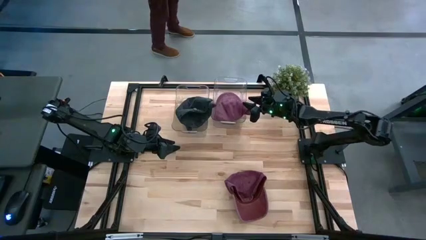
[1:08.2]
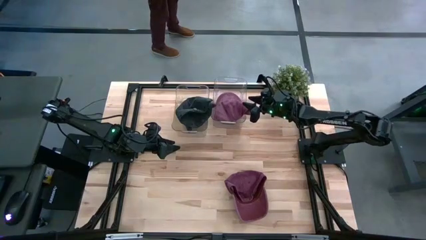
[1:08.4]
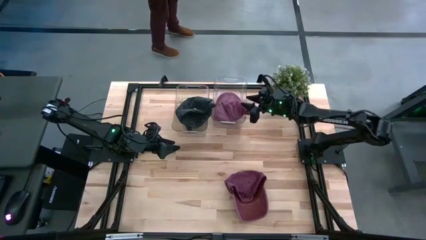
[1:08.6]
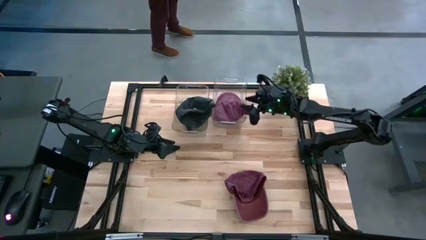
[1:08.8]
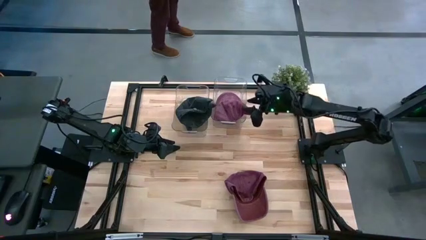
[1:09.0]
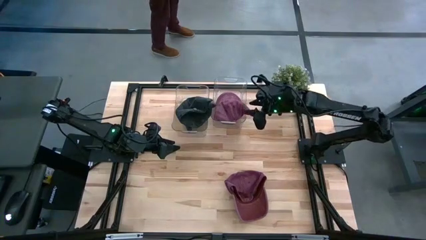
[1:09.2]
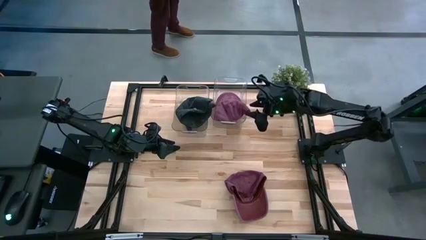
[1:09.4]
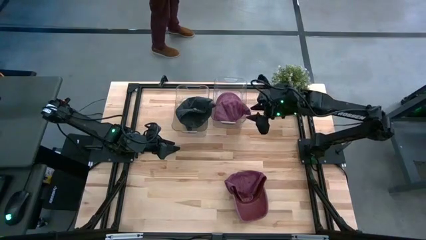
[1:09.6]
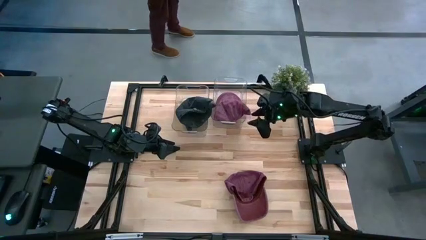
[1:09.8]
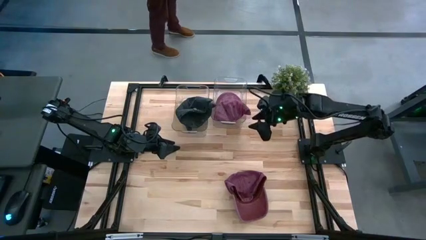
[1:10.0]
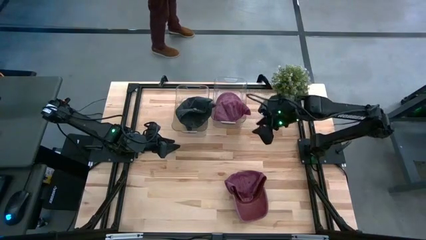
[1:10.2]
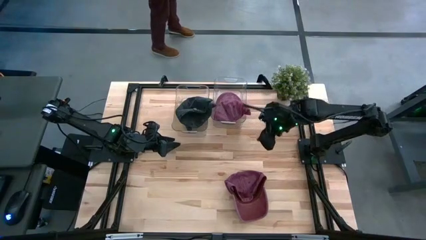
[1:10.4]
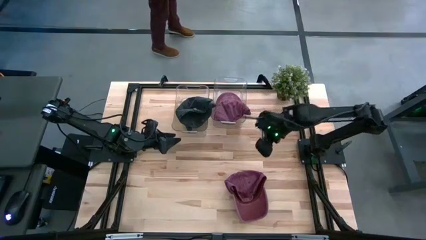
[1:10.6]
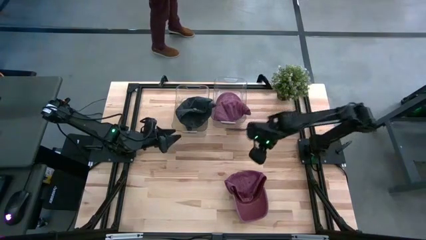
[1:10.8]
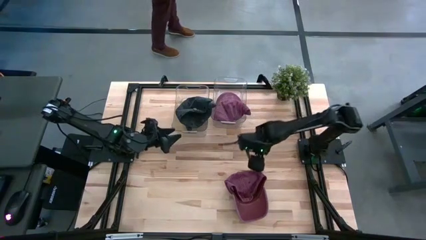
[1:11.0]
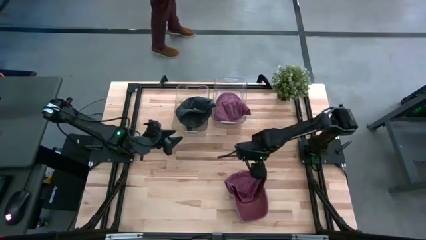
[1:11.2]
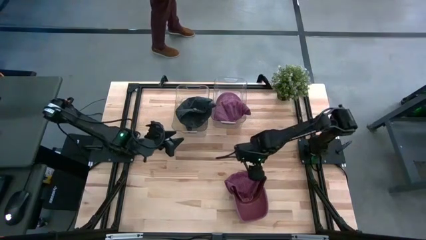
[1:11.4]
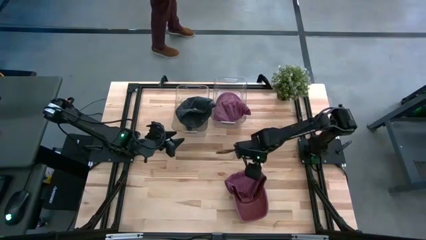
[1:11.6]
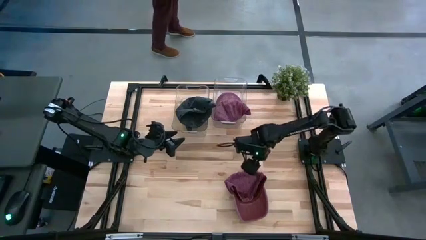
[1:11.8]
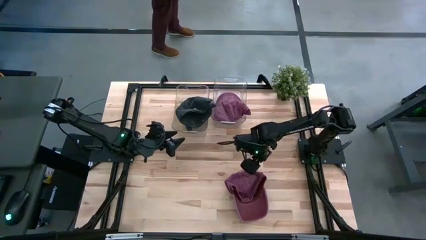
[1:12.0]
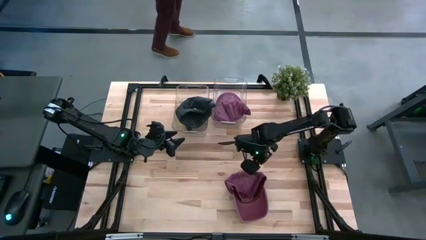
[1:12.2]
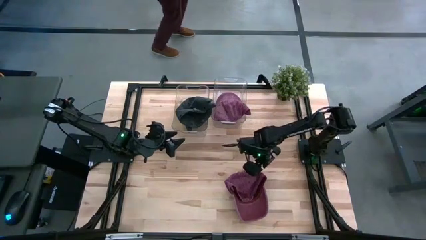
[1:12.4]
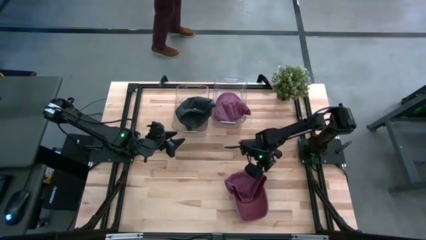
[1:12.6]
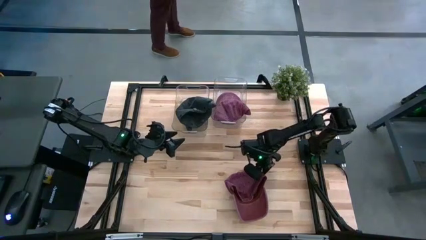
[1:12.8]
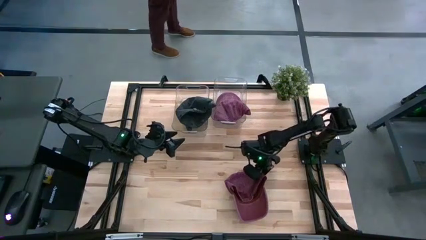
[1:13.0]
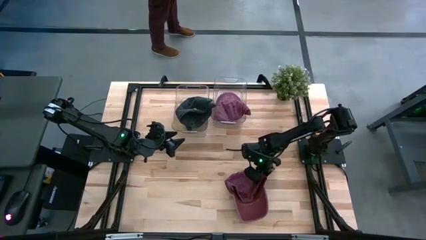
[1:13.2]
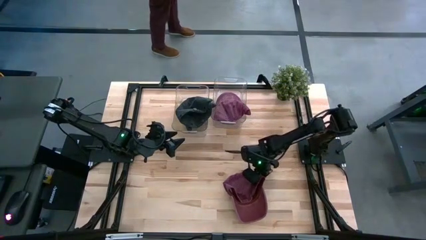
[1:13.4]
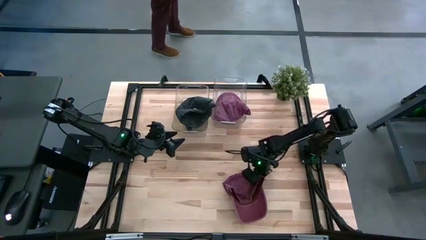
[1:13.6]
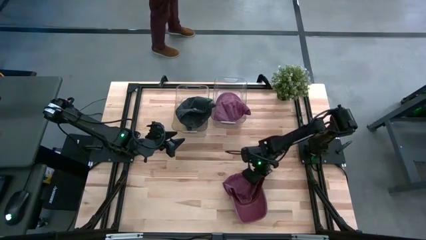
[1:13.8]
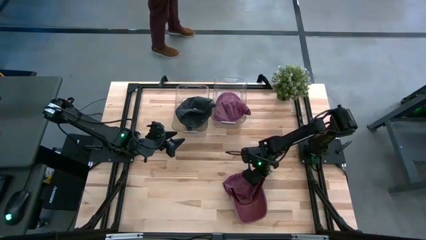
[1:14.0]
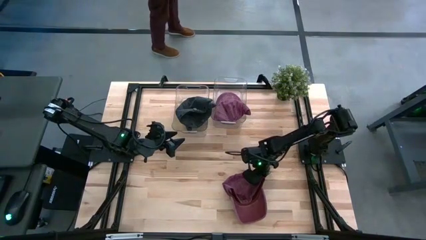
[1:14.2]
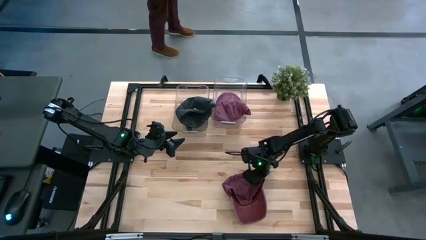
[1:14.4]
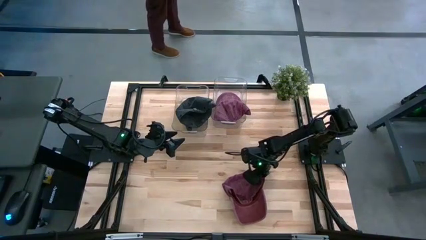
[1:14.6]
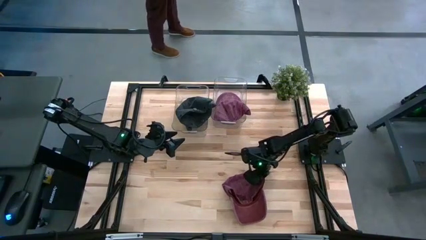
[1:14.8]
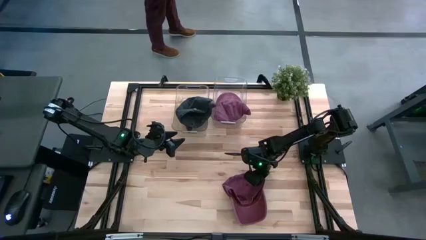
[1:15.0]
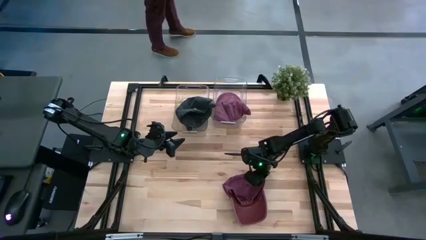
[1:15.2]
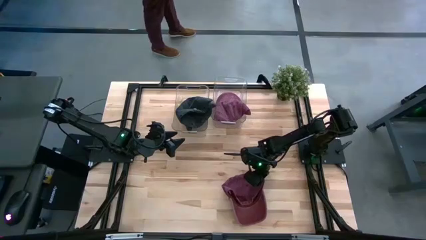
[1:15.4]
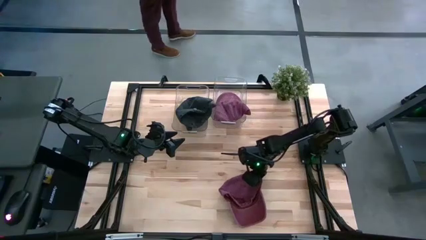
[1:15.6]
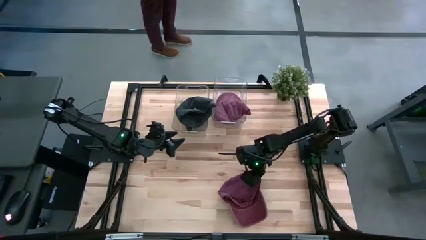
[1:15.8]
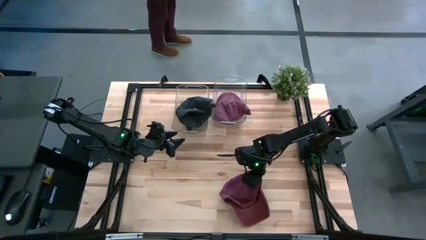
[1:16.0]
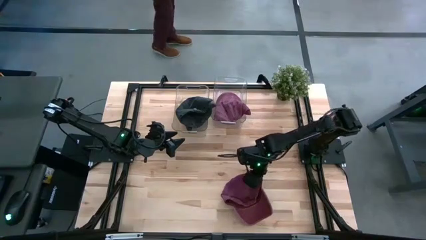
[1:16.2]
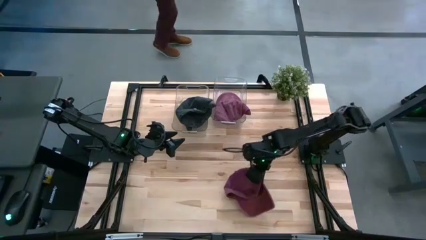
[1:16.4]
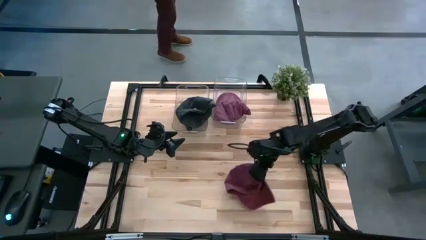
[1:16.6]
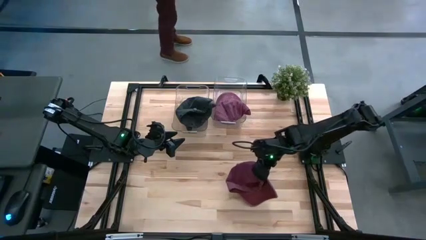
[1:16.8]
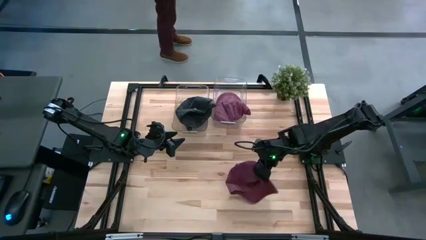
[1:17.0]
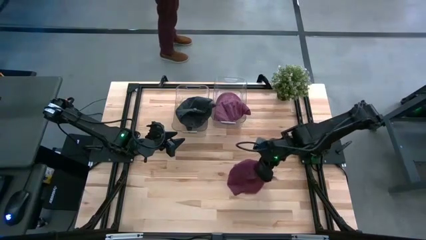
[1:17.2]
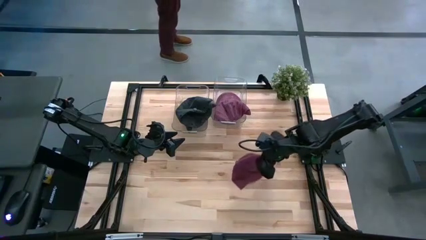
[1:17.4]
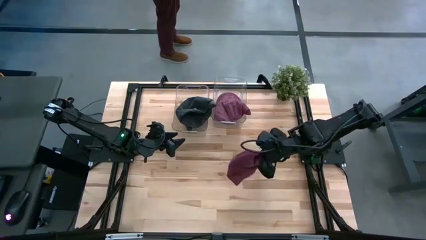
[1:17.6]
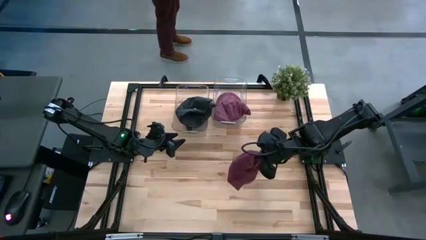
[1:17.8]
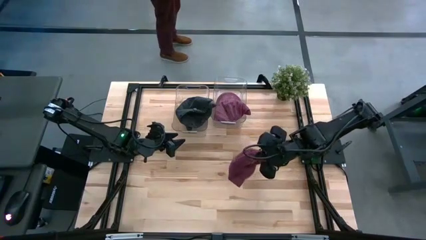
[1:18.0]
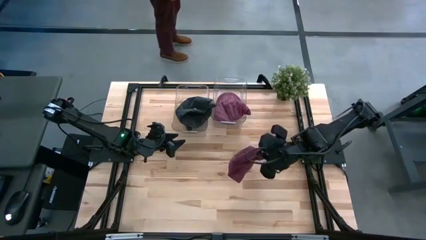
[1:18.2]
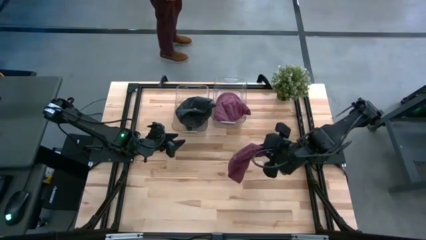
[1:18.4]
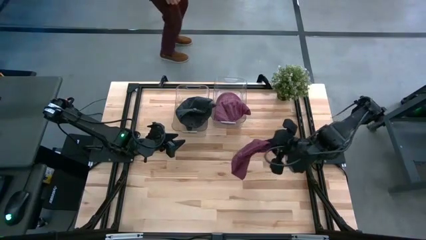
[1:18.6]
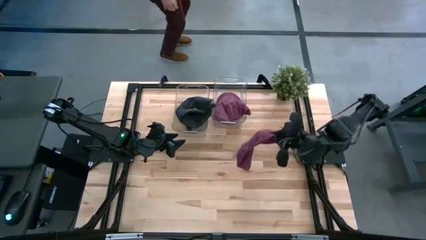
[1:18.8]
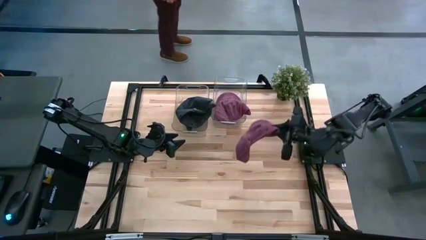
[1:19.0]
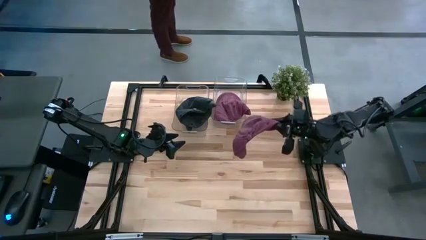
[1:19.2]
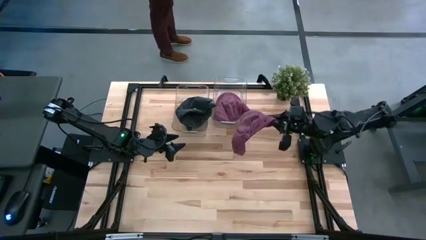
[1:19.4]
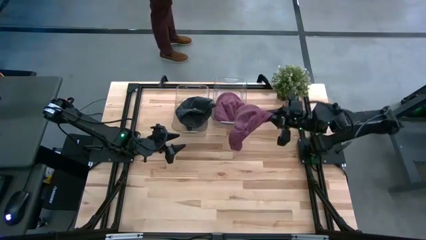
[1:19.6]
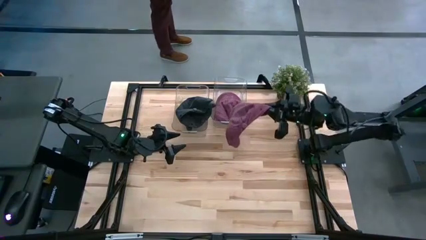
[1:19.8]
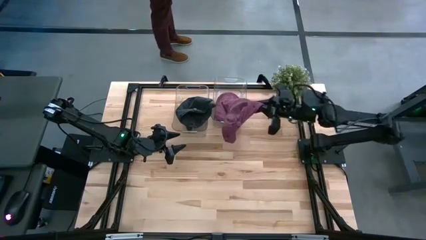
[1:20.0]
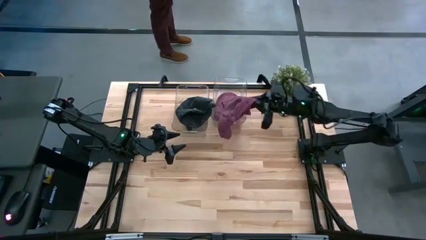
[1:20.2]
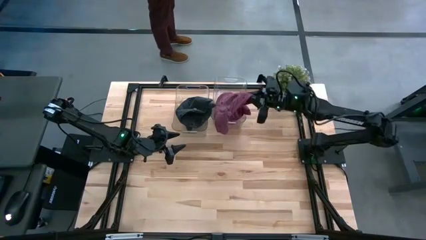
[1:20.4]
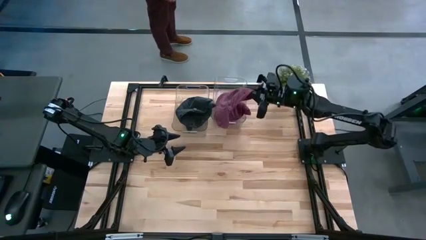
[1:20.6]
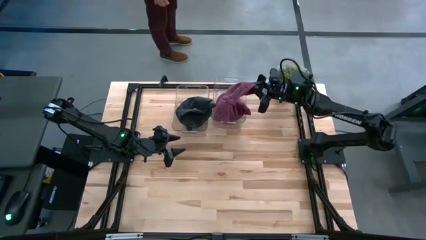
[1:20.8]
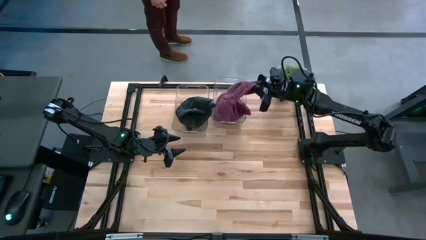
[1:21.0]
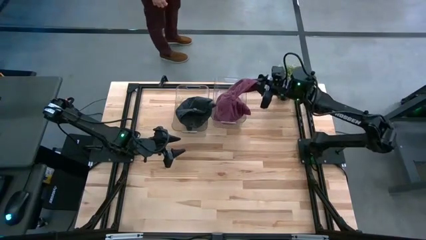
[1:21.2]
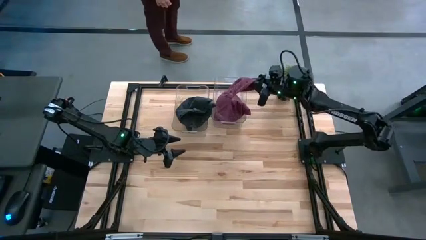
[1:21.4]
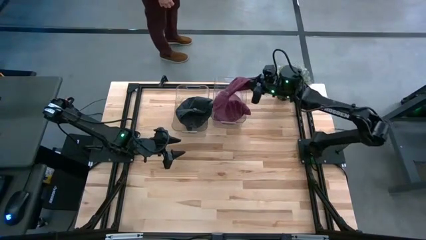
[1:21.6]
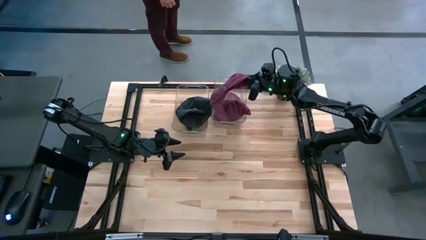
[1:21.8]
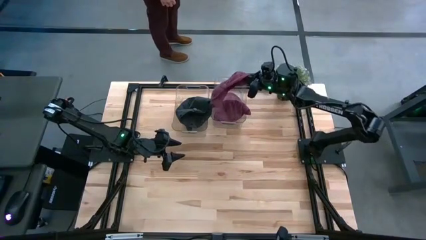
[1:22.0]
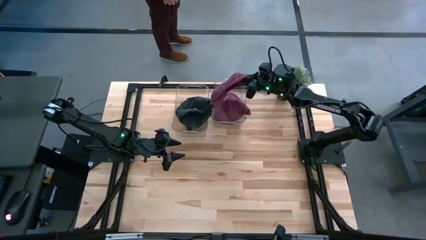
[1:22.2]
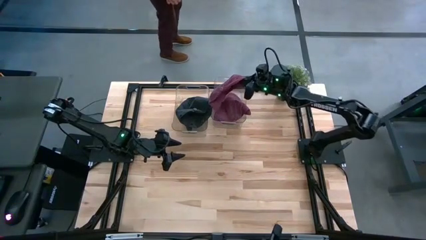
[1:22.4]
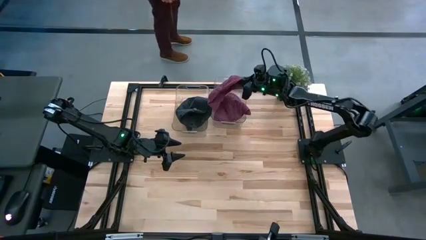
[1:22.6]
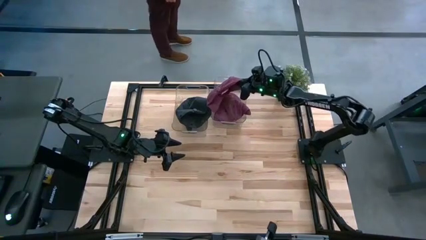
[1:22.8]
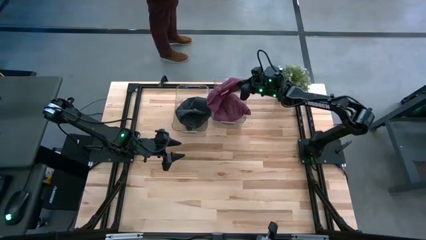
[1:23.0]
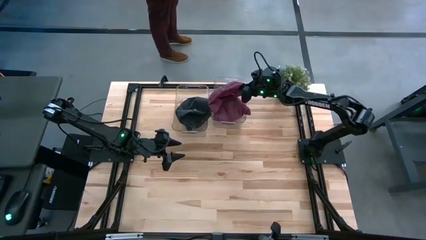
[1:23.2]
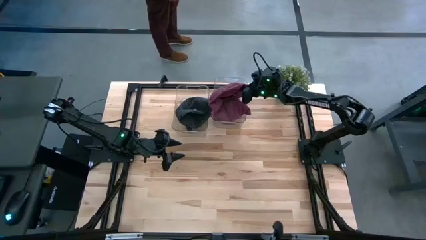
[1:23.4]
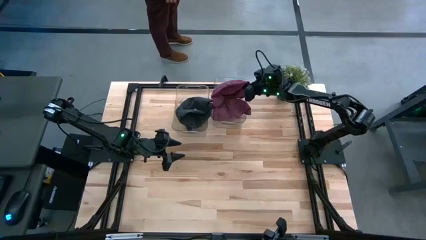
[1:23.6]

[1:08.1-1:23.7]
Task: Pick & Place hat
Put the red cap into the right transparent bin

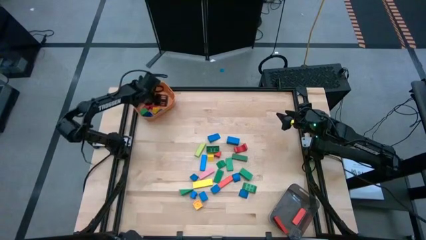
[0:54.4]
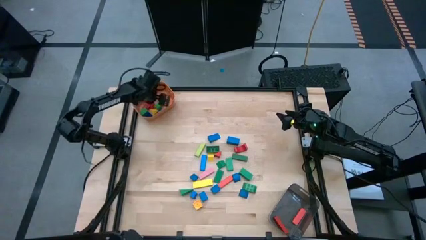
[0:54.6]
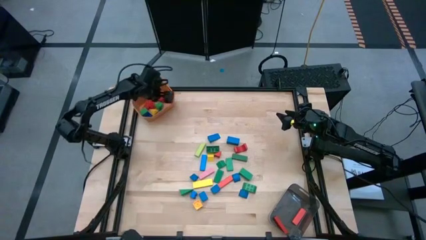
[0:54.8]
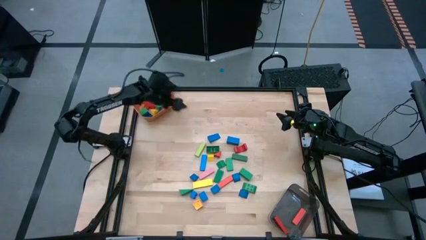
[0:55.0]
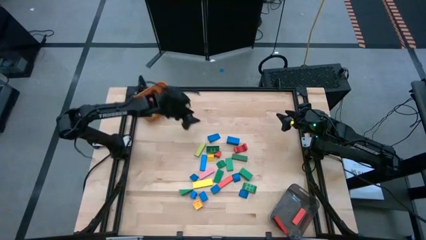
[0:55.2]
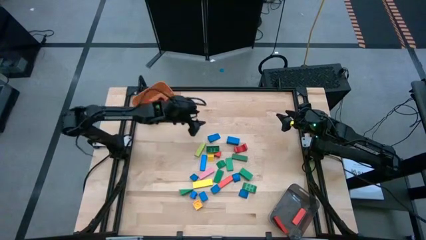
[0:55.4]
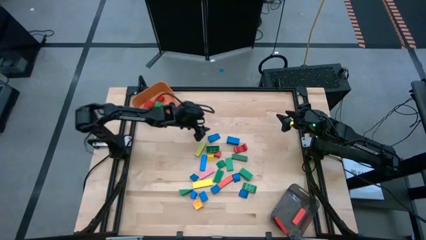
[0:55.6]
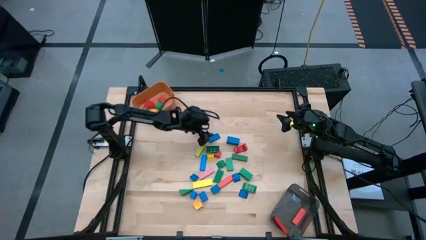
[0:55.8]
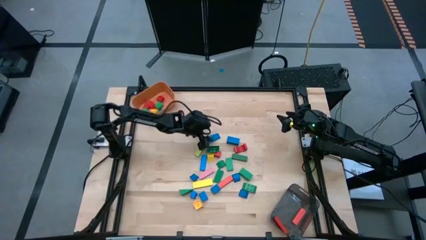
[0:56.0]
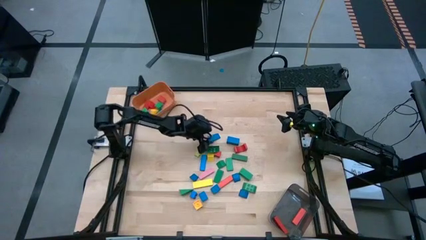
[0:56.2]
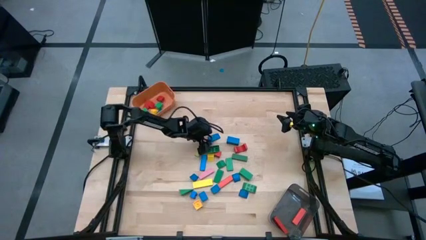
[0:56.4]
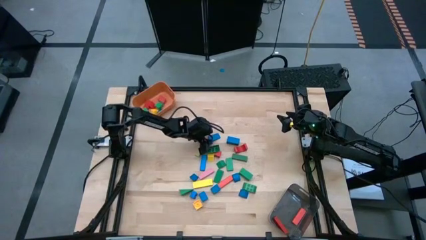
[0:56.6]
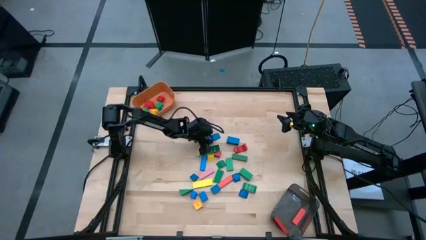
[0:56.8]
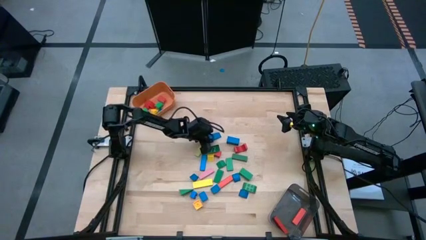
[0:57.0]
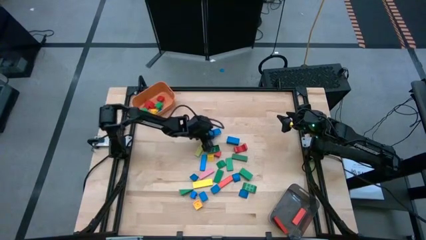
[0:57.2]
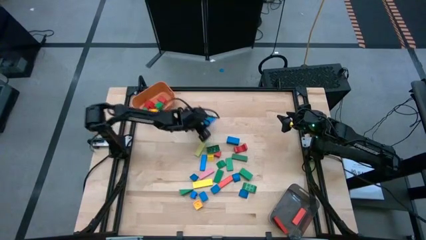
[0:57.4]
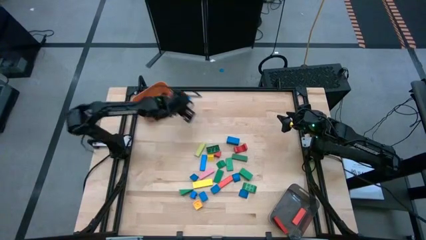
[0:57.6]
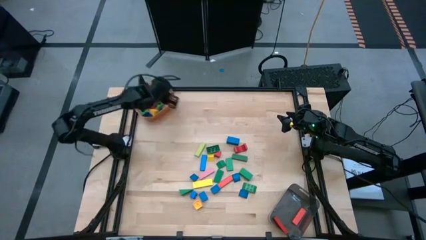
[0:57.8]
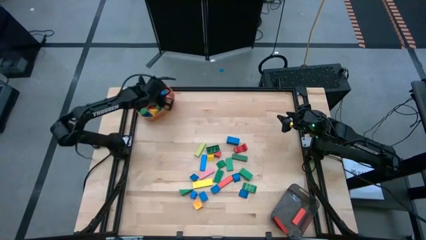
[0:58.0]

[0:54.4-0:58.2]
Task: Sort blocks by size
Put the small blue block into the orange bin
